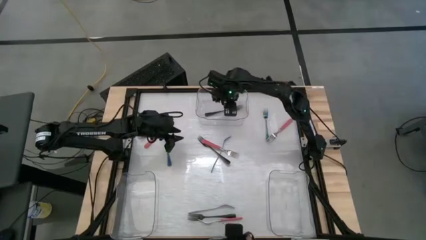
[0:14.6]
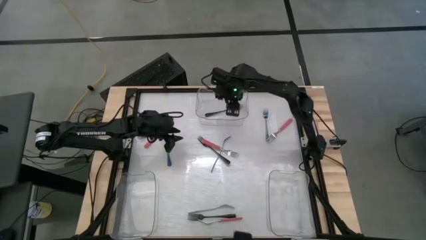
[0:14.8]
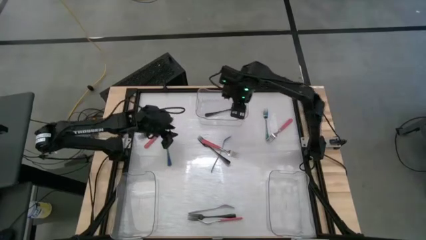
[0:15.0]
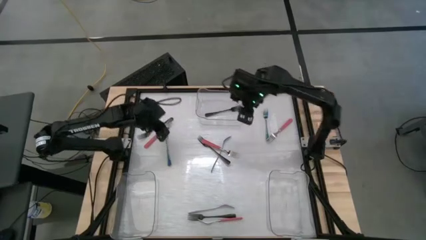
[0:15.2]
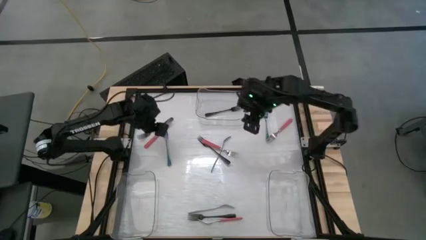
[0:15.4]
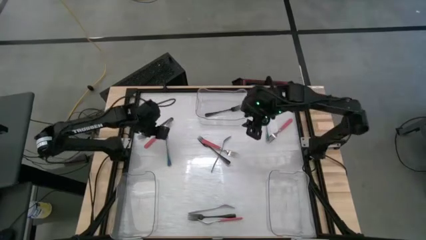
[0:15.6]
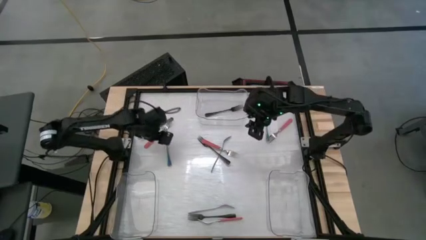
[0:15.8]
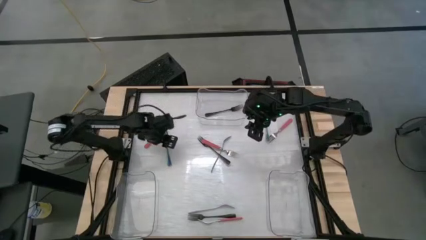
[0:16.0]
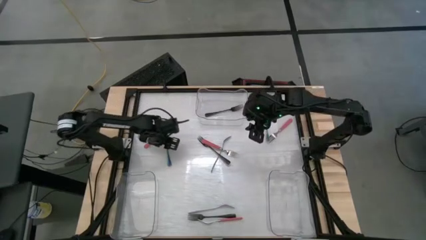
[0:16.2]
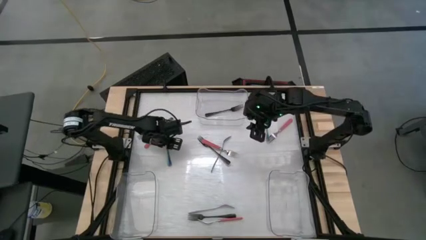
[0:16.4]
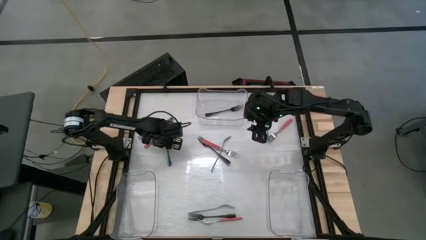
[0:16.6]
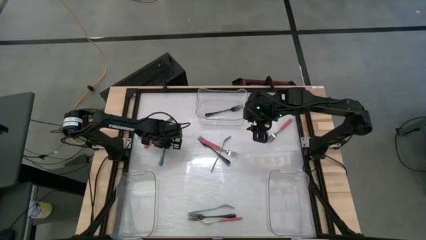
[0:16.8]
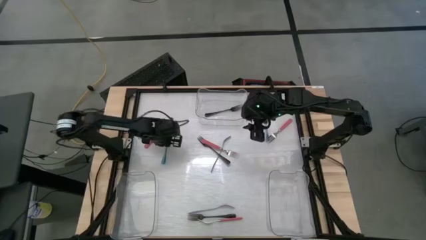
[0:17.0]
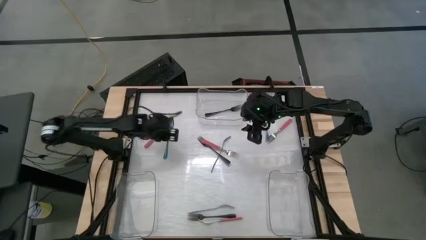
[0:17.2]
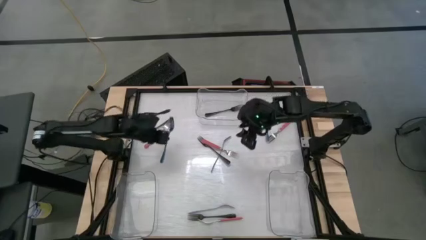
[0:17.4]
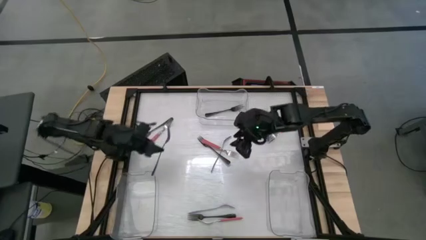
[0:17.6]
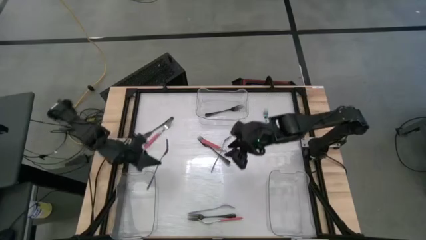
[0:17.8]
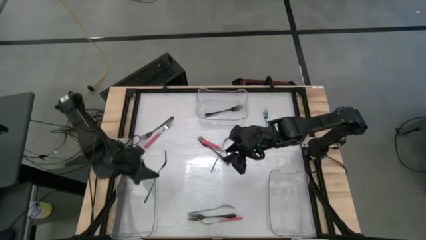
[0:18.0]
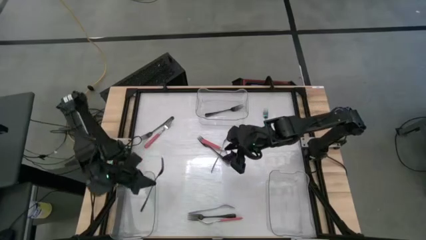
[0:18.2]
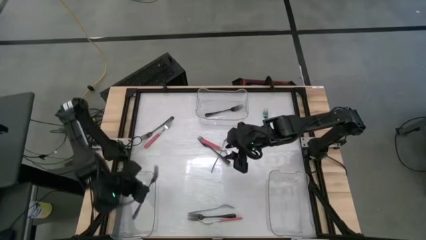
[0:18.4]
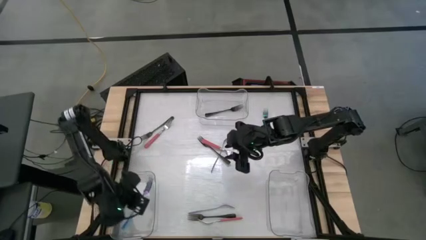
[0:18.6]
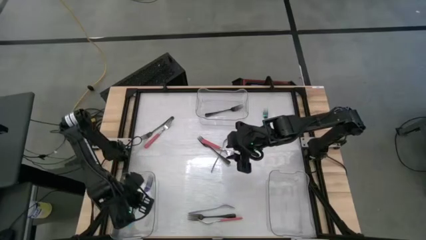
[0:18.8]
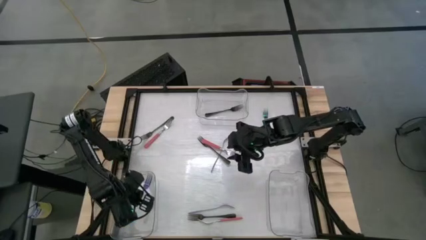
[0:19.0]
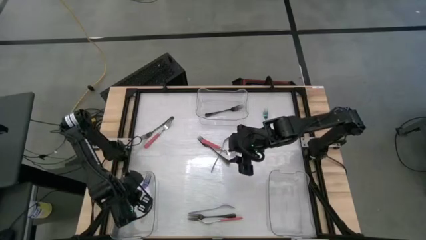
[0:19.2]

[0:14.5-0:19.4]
Task: Sort silverware by color (type)
Put the blue fork into the bottom left transparent bin

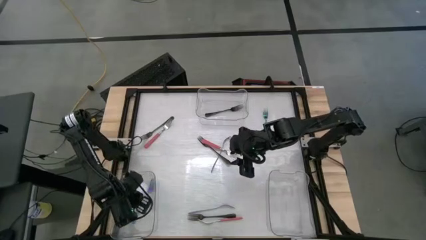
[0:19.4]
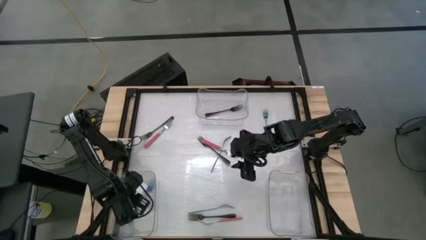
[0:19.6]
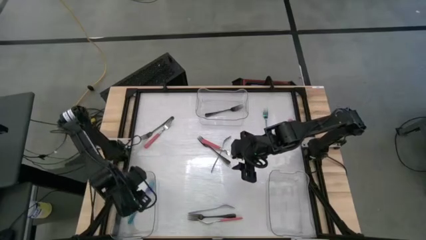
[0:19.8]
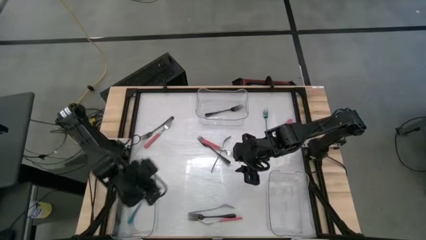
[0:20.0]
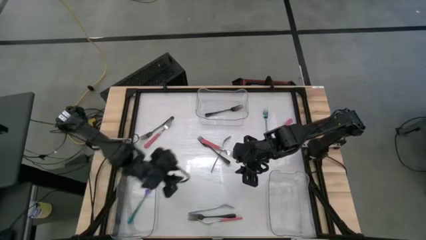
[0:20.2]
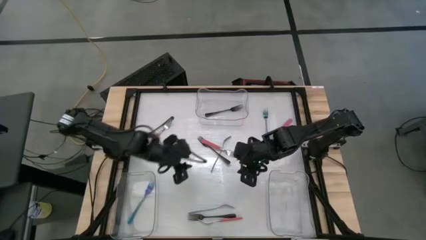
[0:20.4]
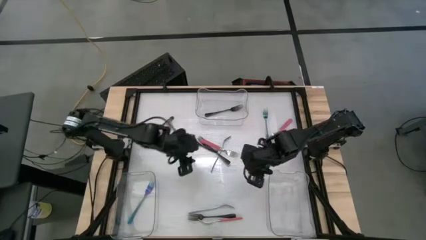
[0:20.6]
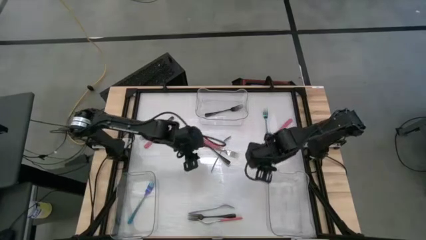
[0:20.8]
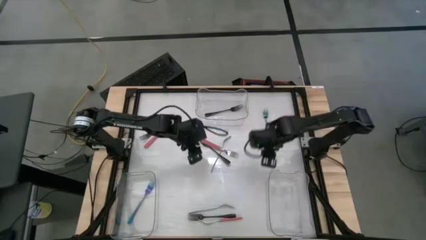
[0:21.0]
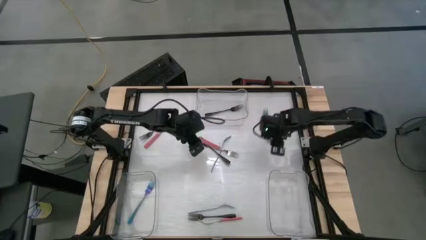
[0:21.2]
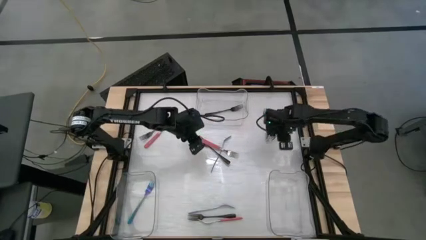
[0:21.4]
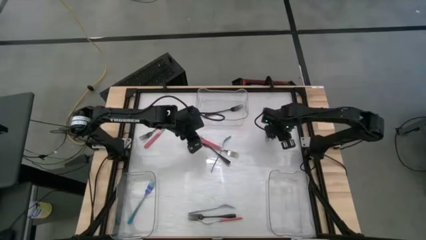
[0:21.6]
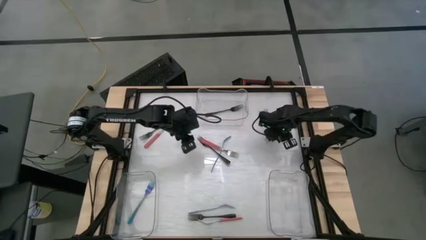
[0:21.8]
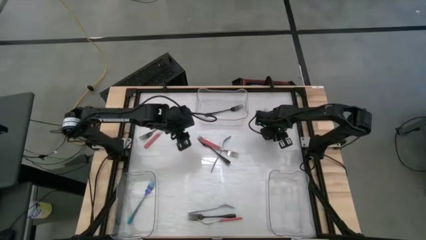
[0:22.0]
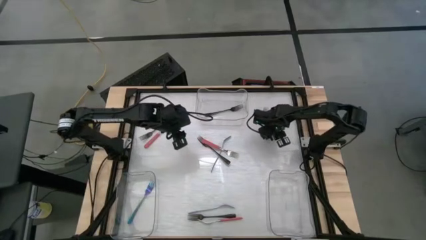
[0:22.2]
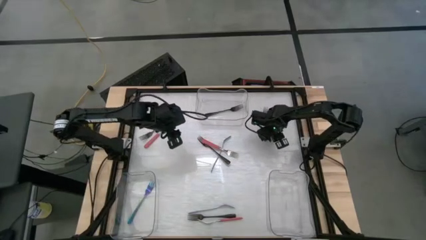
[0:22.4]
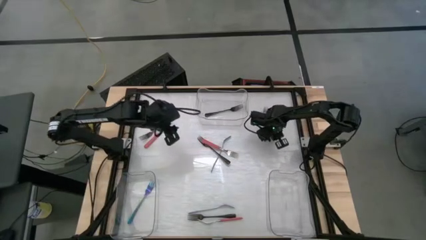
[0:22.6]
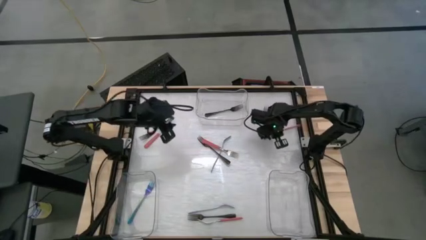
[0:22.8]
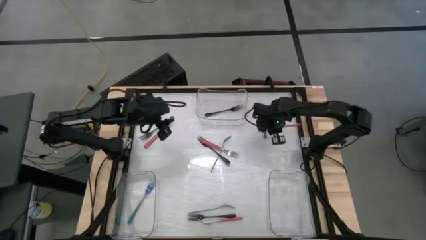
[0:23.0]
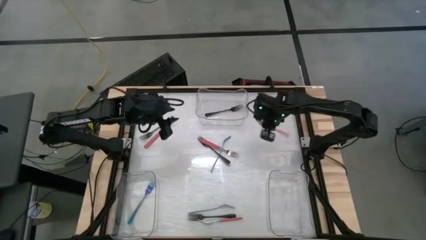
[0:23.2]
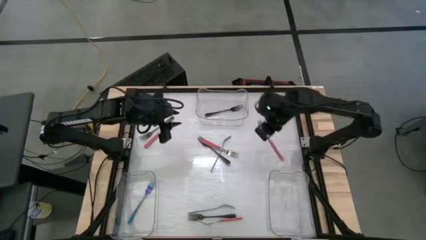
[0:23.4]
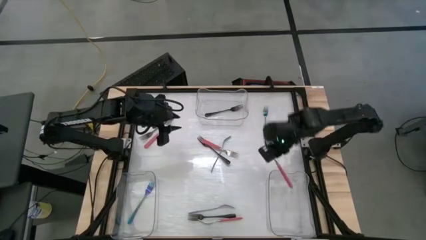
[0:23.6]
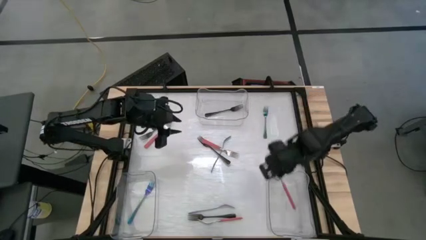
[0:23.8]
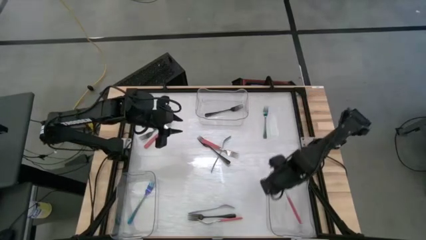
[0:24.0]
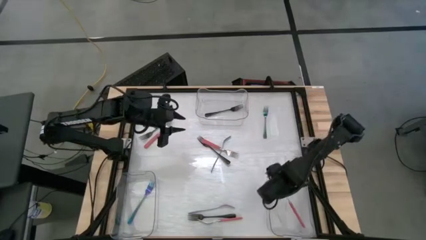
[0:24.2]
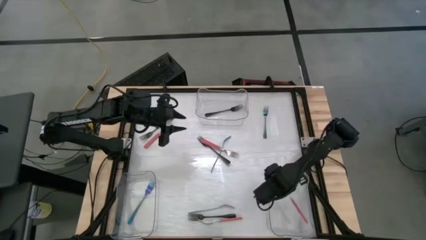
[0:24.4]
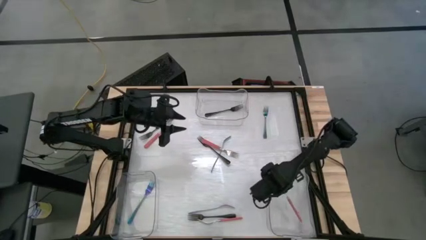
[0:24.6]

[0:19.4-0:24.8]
Put the pink fork into the bottom right transparent bin

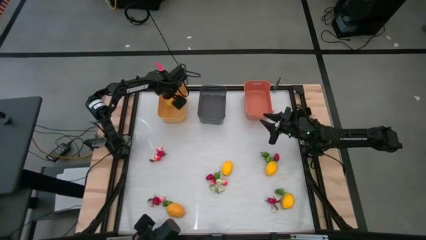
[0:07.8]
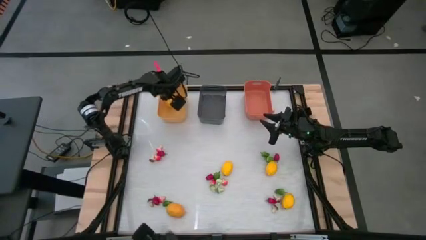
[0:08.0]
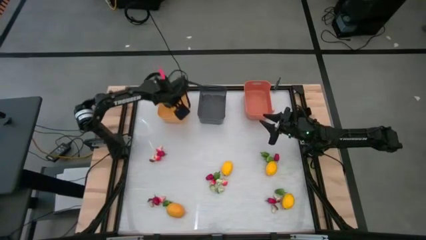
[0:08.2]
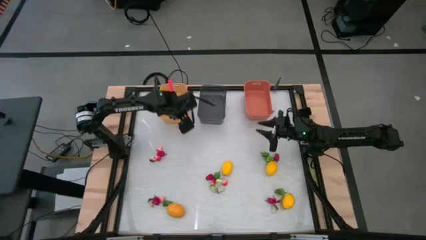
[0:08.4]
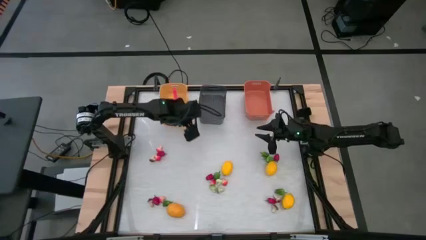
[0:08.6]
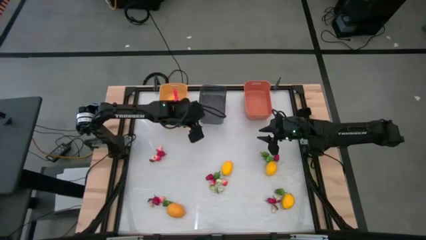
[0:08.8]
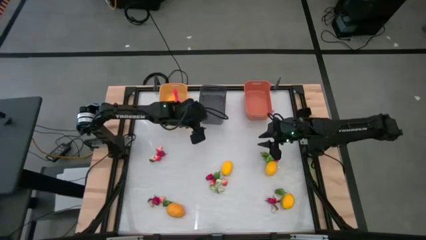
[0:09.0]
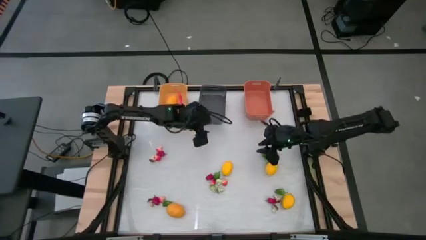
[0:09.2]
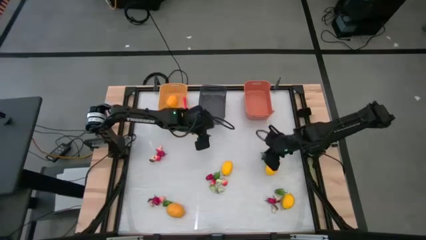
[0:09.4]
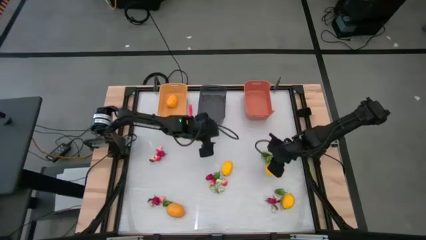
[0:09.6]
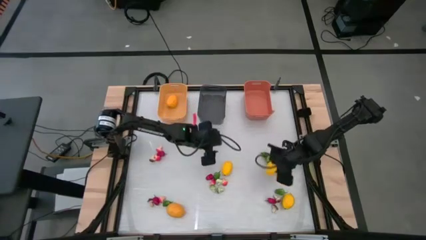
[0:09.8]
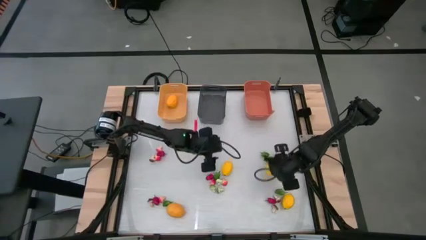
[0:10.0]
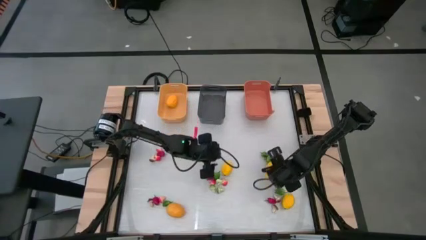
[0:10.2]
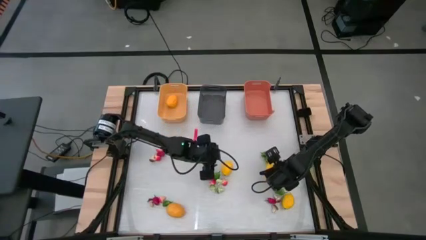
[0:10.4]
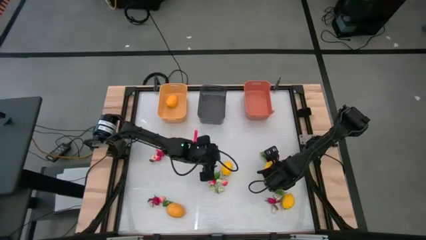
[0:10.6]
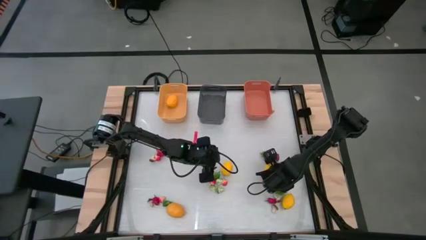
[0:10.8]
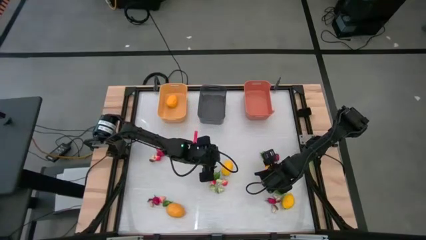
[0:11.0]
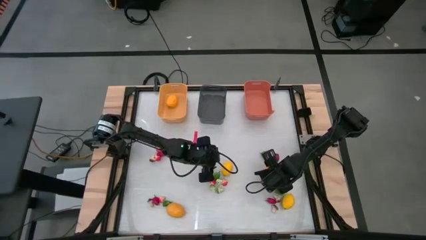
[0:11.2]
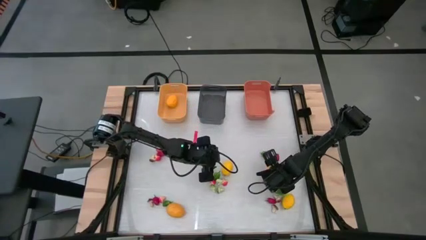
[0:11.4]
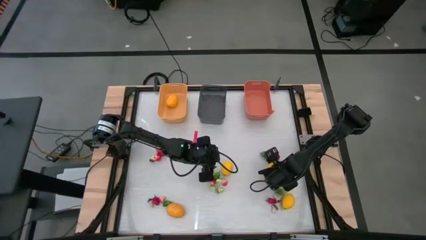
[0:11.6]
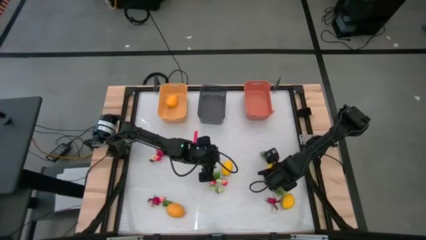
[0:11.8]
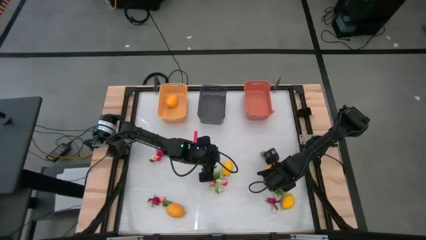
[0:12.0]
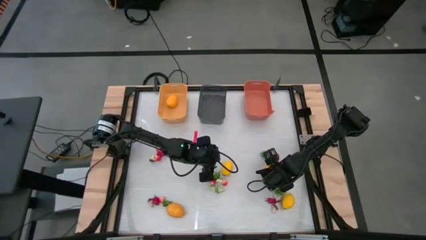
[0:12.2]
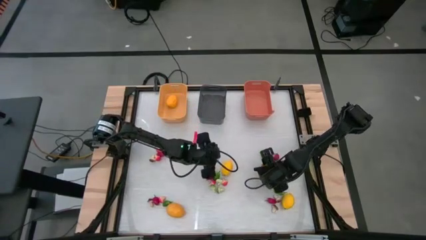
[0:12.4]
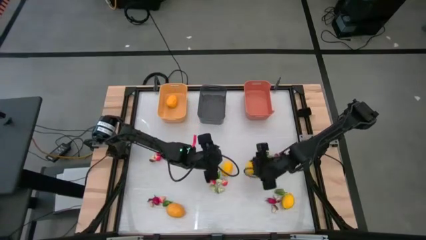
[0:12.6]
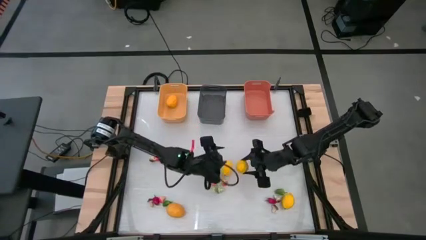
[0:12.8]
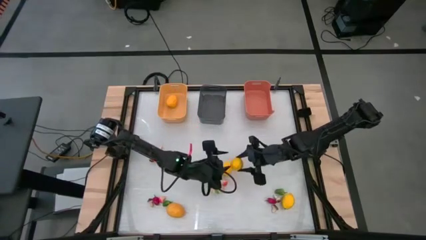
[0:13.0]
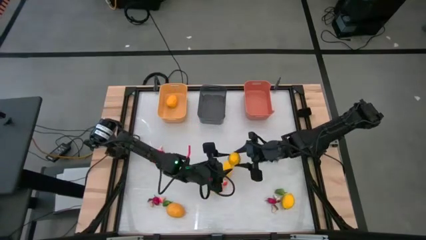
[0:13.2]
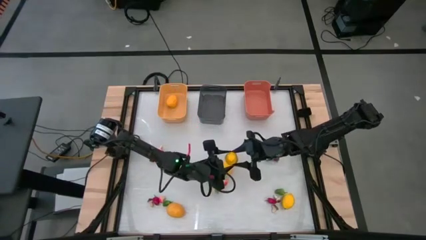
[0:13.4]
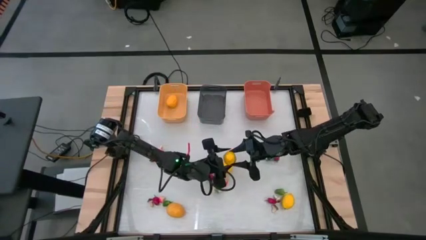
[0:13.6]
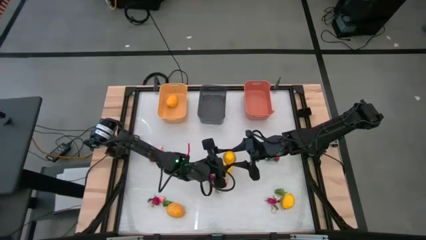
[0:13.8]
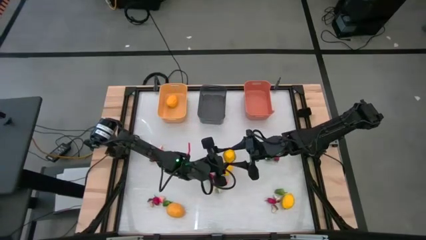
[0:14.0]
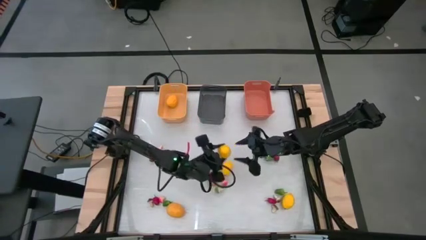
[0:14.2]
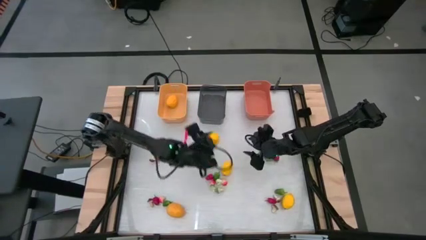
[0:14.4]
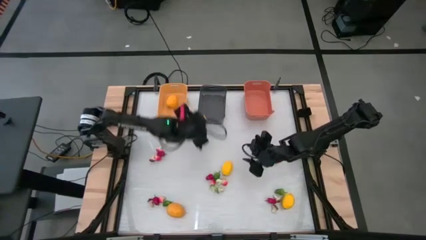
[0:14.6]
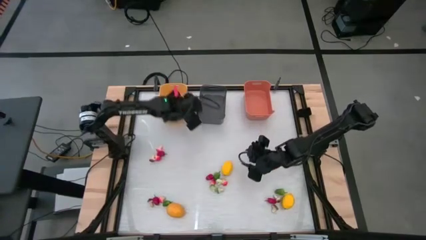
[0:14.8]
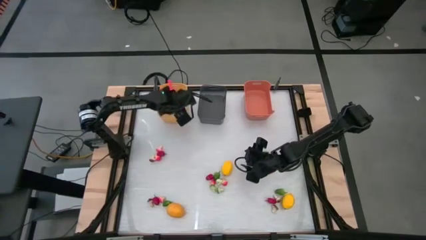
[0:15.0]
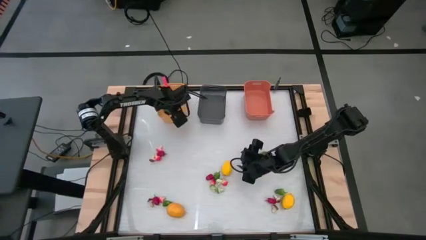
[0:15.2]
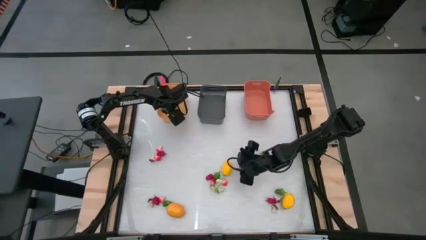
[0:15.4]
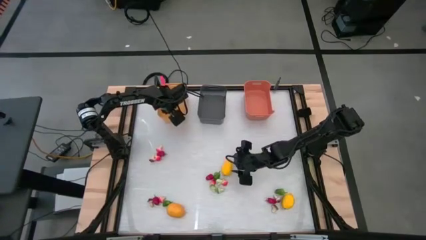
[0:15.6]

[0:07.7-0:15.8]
Task: Sort produce into baskets
Put the yellow lemon into the yellow bin
